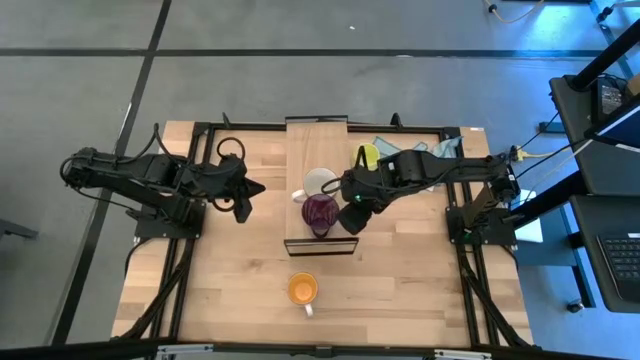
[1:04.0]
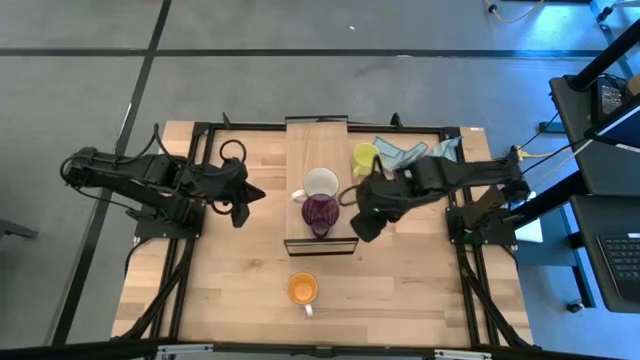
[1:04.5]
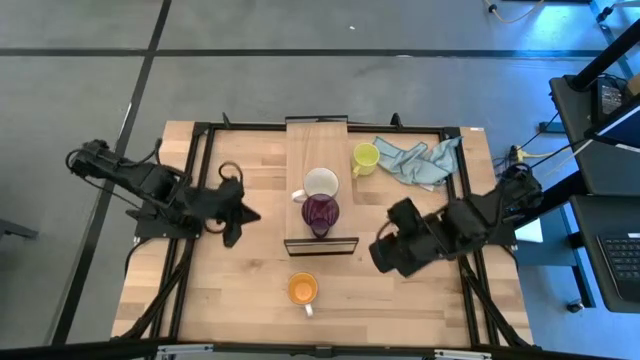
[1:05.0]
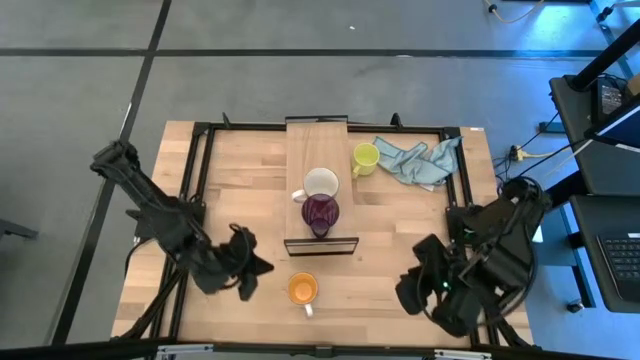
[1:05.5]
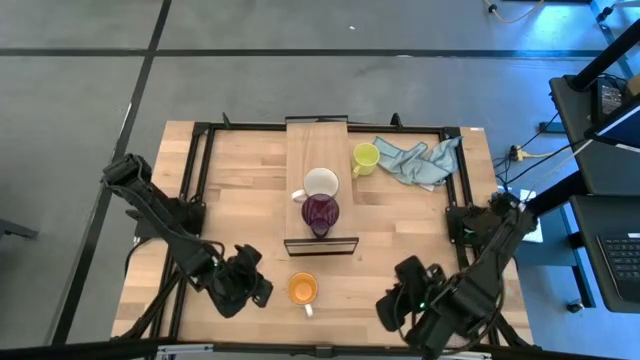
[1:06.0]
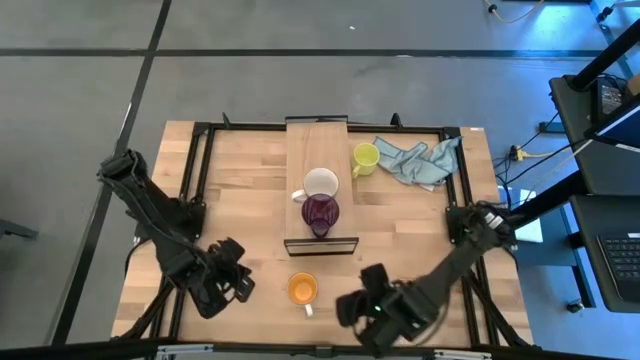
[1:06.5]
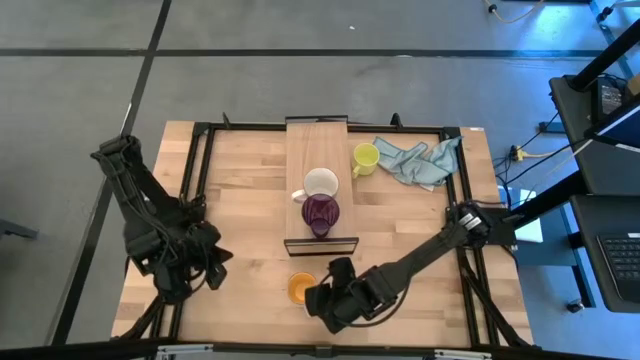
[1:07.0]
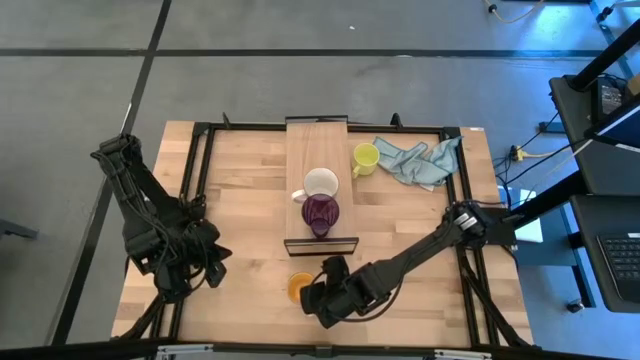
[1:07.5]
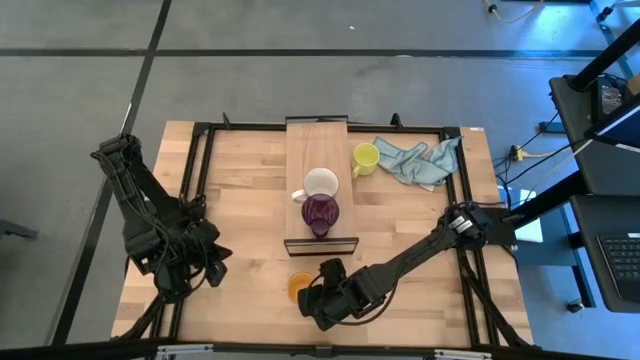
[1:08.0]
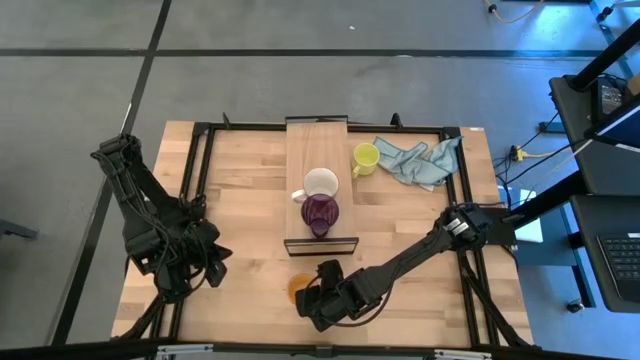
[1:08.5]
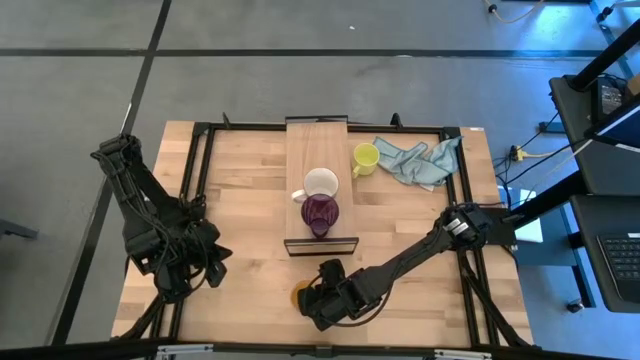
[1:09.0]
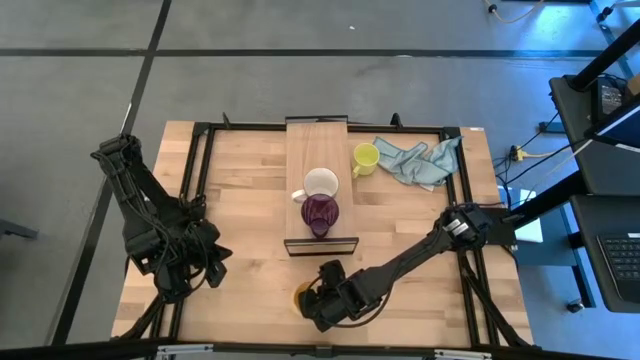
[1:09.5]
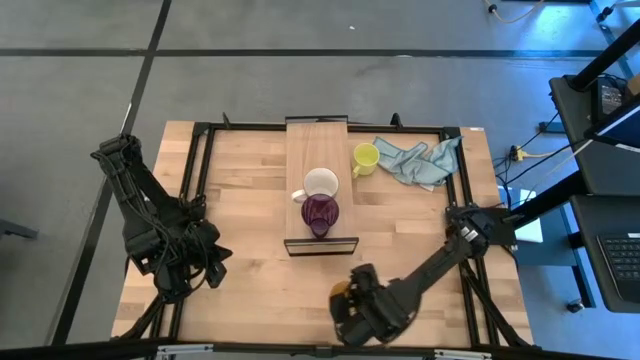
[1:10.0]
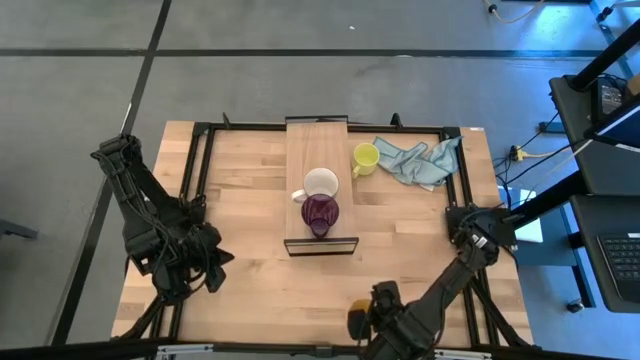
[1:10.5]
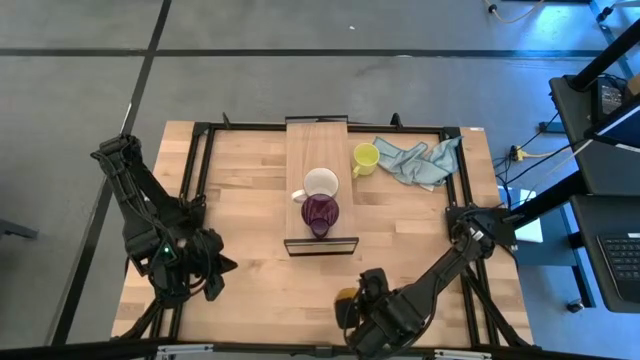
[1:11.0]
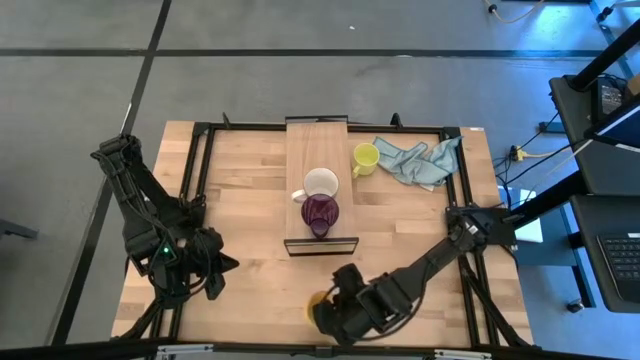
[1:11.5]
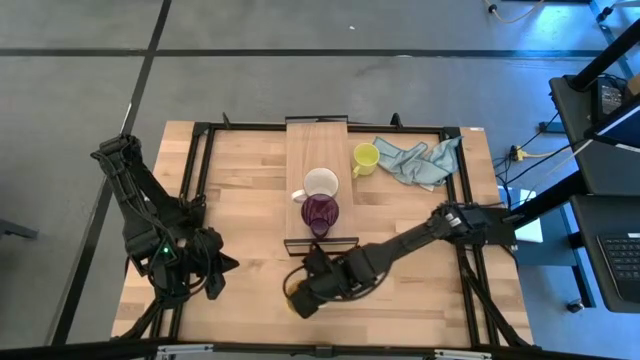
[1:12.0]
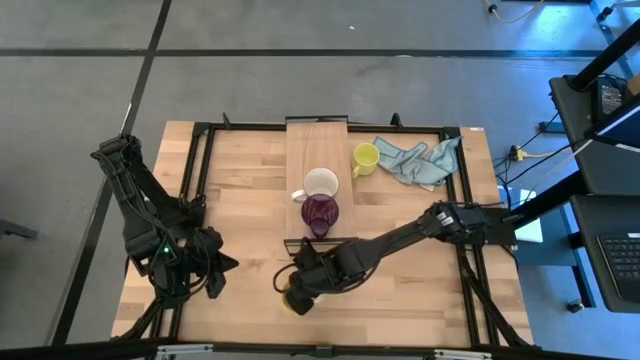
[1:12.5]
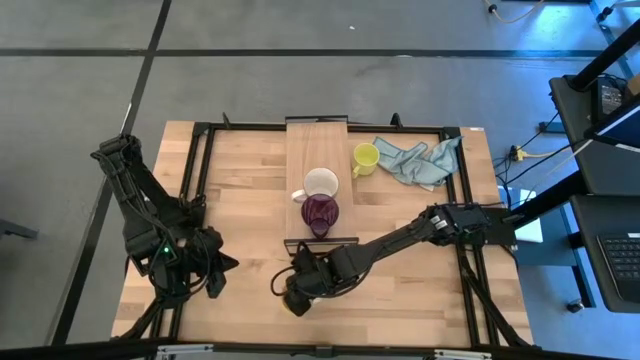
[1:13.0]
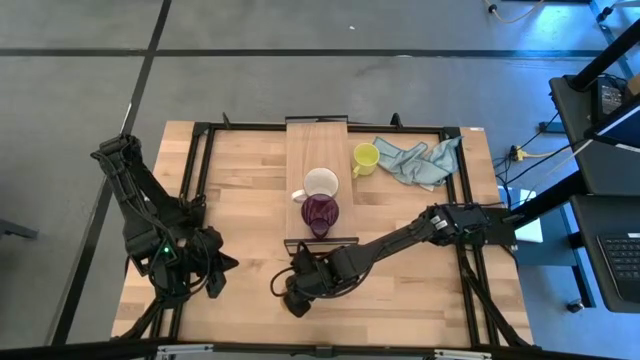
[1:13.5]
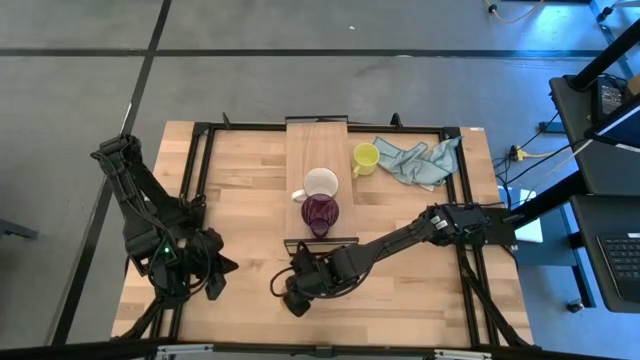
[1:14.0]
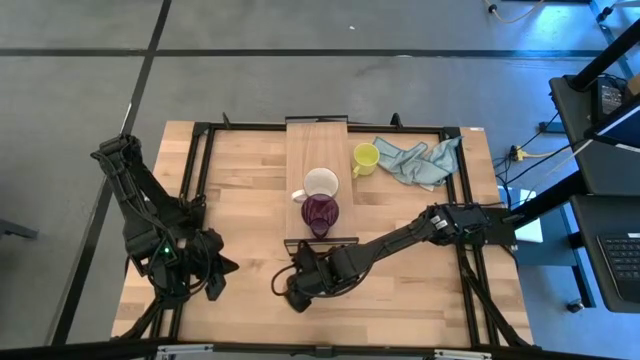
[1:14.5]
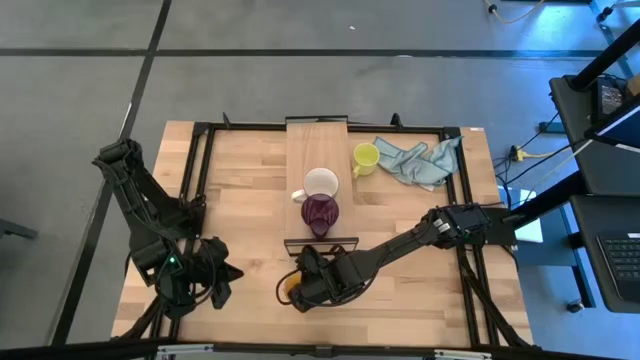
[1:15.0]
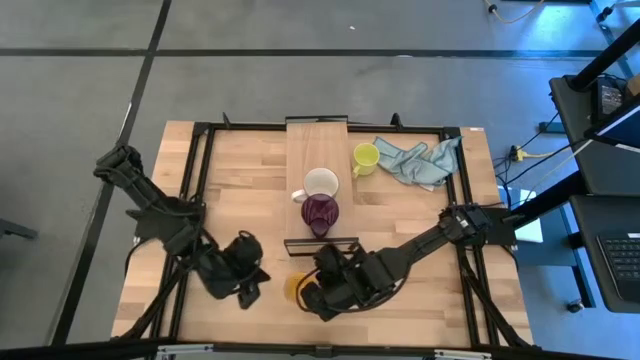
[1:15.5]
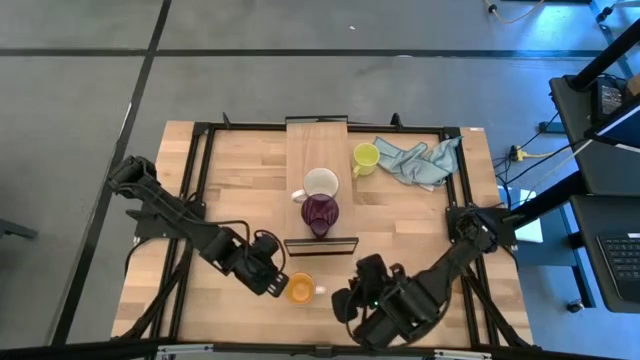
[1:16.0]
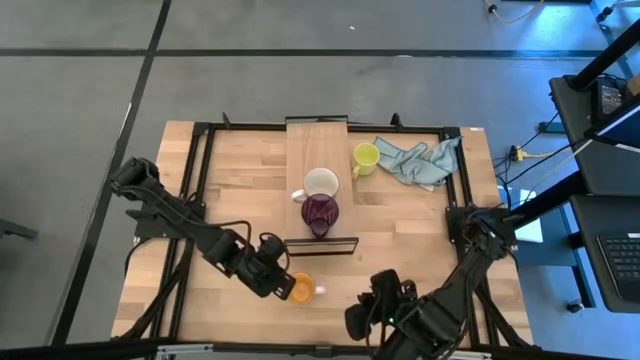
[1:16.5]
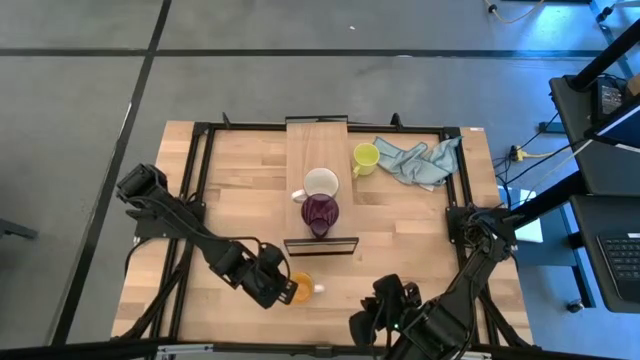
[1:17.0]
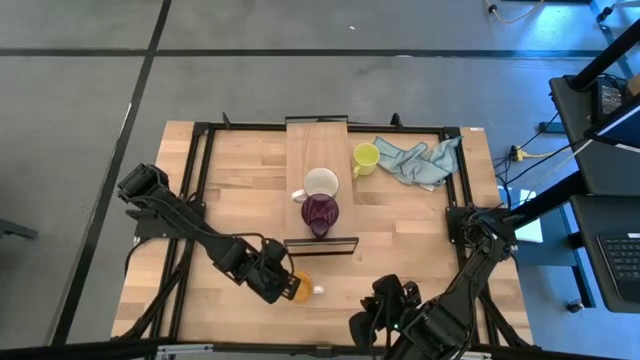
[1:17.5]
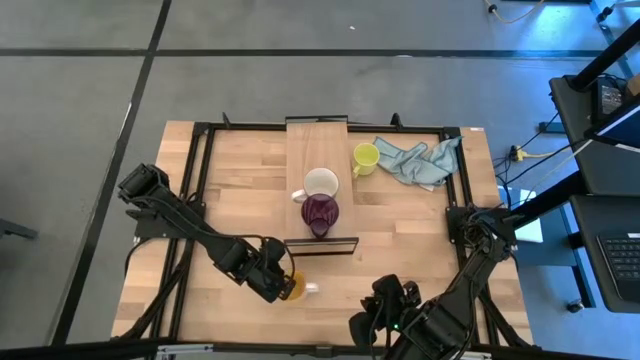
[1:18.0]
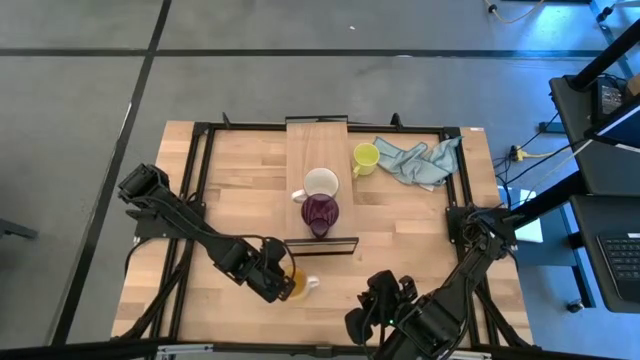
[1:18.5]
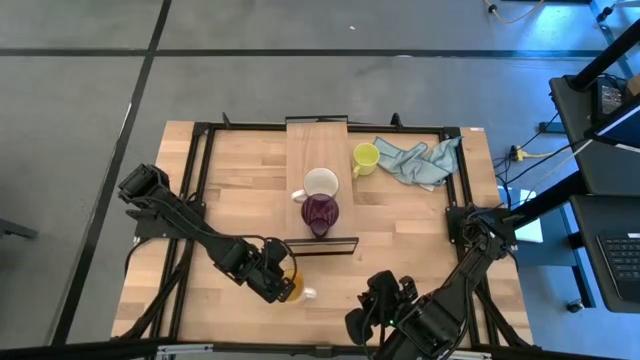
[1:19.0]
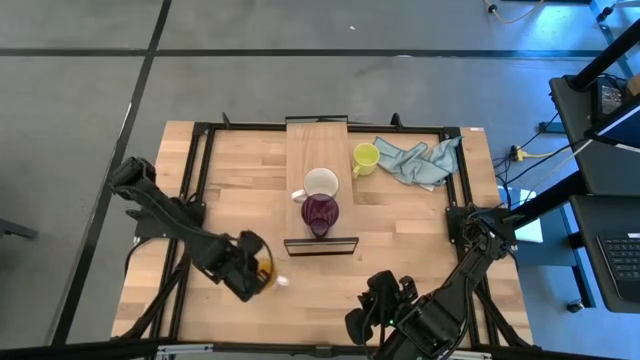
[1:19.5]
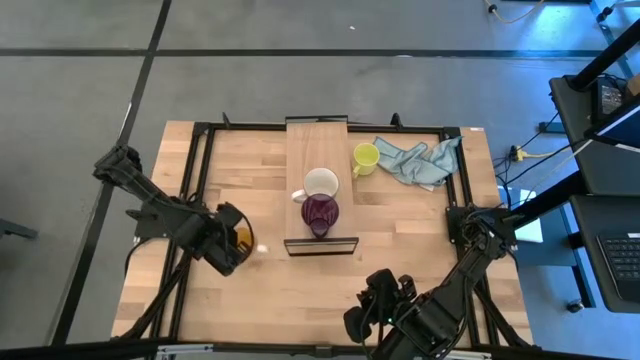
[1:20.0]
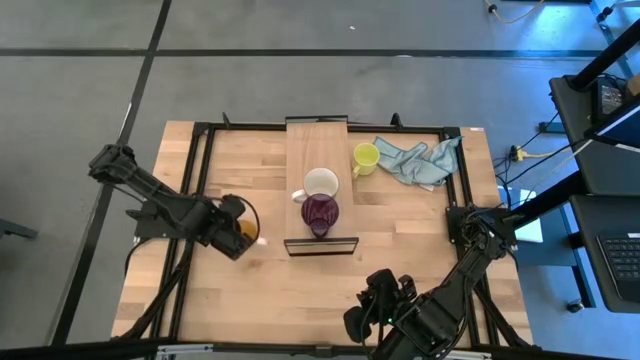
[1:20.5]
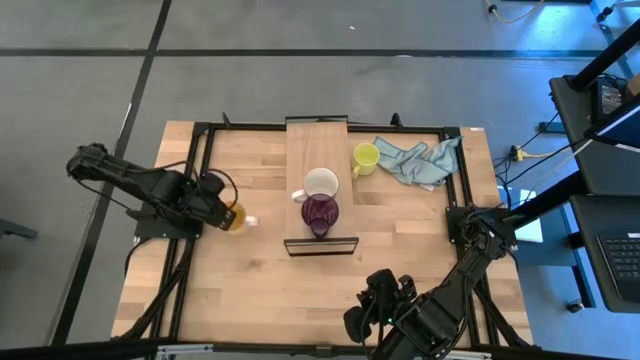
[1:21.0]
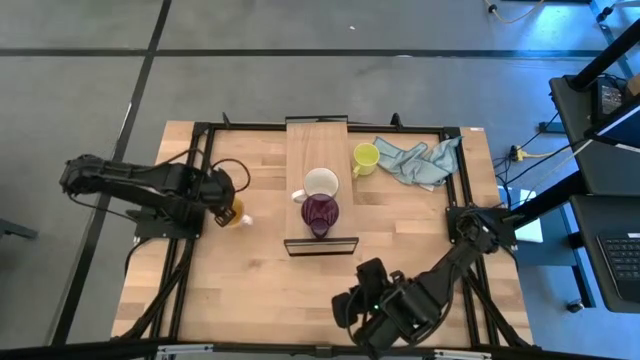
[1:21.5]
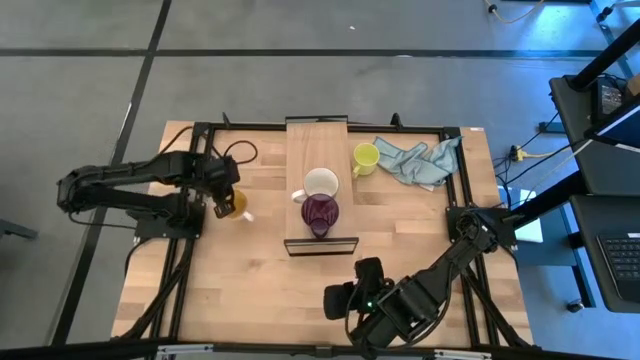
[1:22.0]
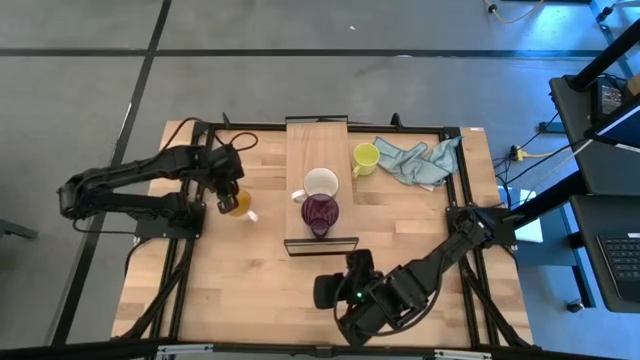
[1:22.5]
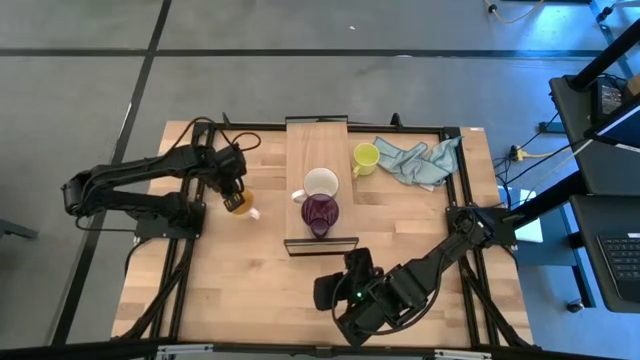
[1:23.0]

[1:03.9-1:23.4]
Task: Stack small to large cups/mugs on shelf
Put the yellow mug on the shelf

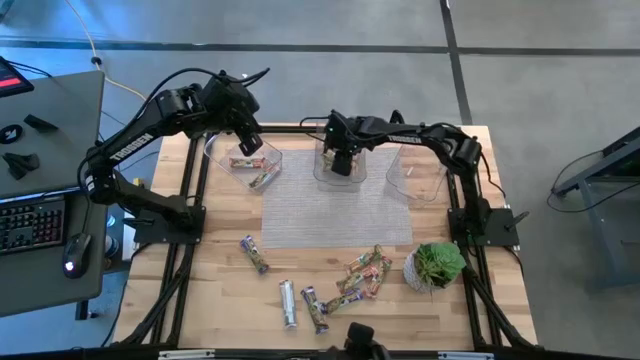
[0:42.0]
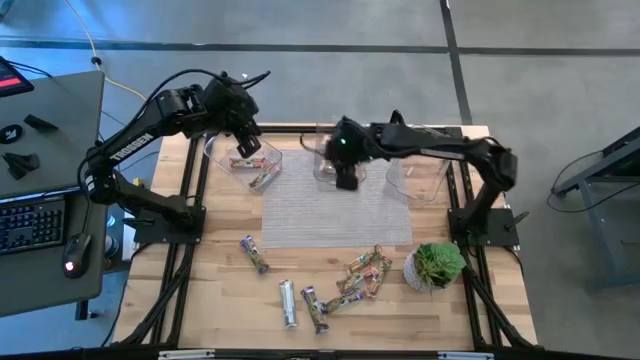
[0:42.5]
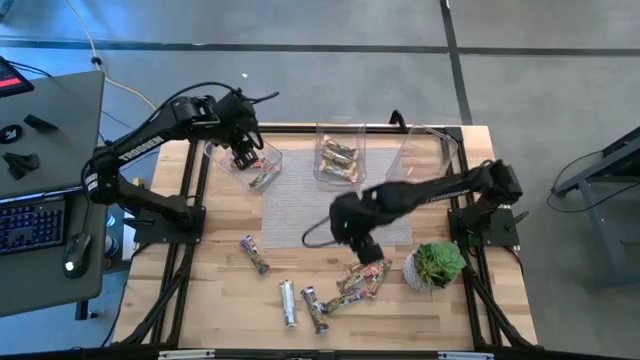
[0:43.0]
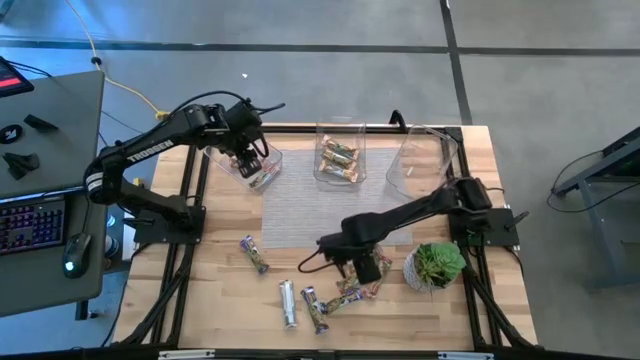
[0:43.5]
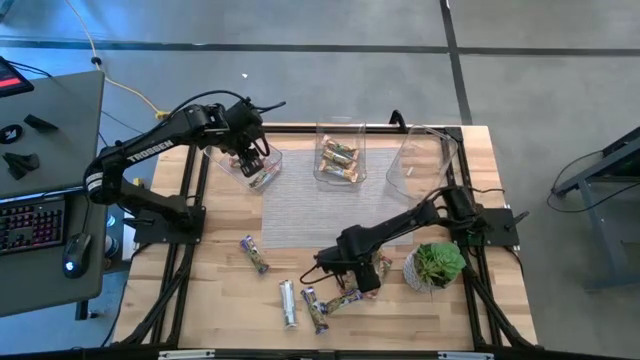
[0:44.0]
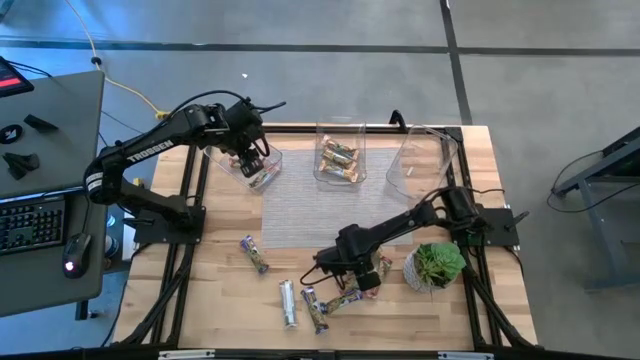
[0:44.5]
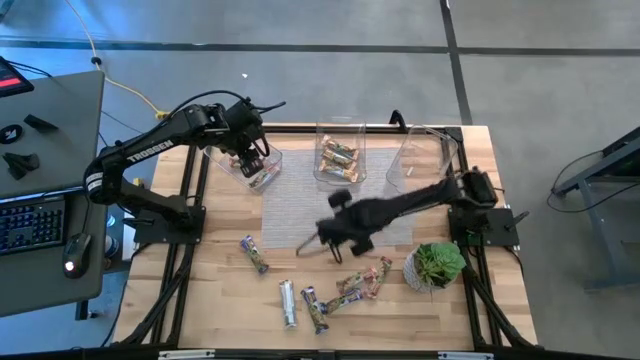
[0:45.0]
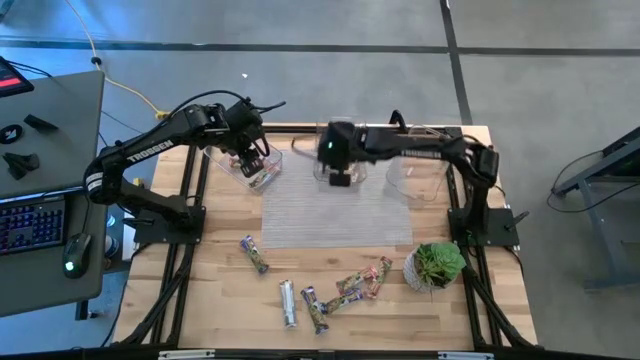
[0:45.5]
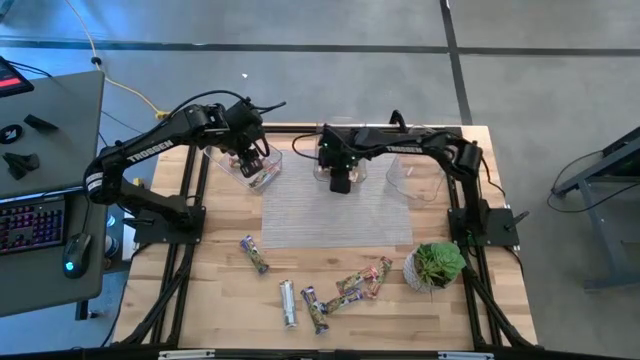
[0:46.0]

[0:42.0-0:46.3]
Task: Pick and place Granola Bars by type
Put the yellow granola bar into the middle transparent bin
